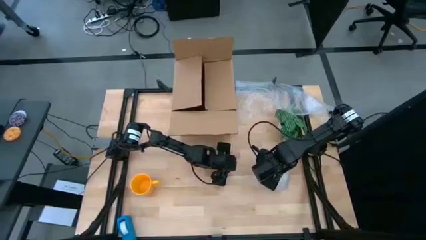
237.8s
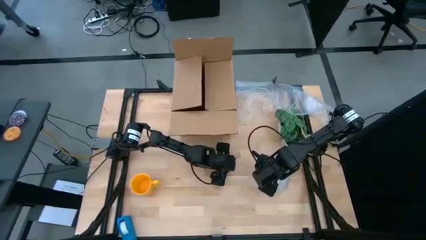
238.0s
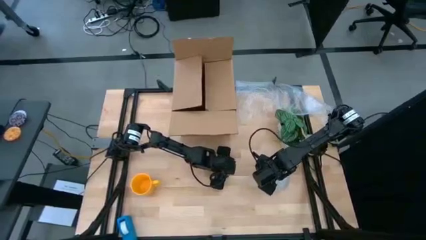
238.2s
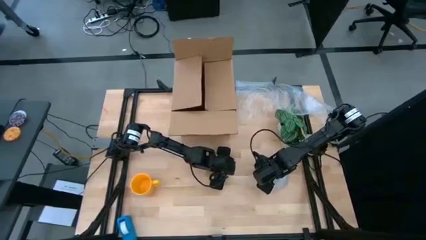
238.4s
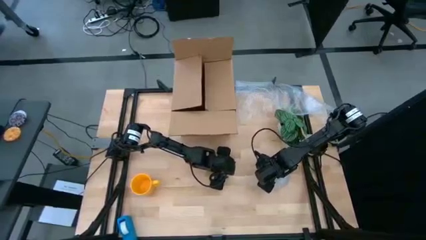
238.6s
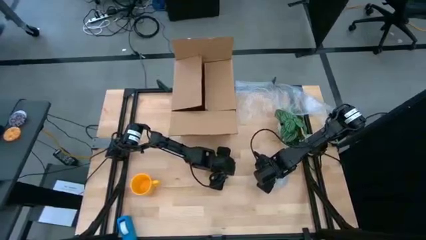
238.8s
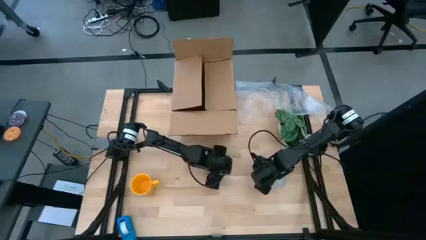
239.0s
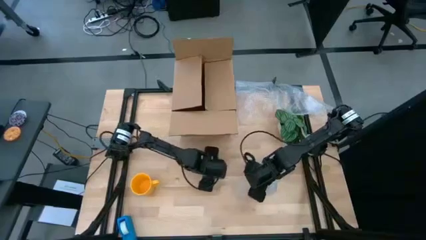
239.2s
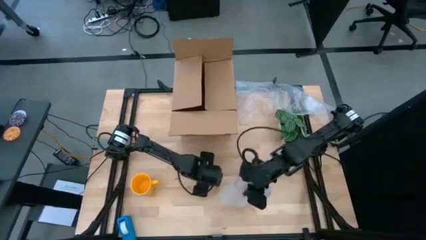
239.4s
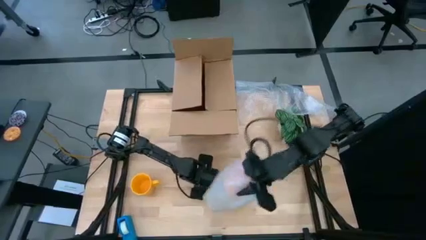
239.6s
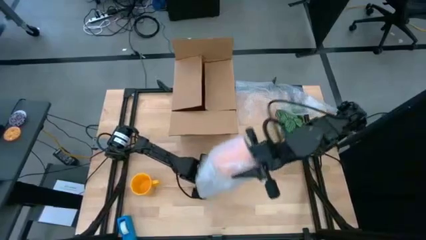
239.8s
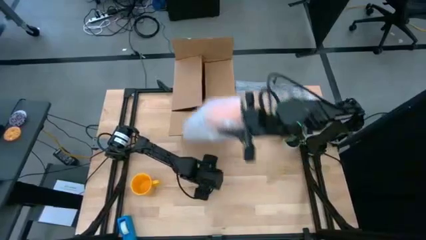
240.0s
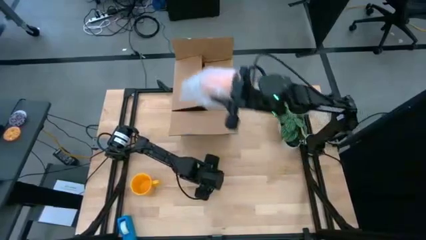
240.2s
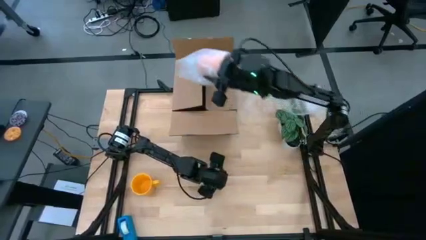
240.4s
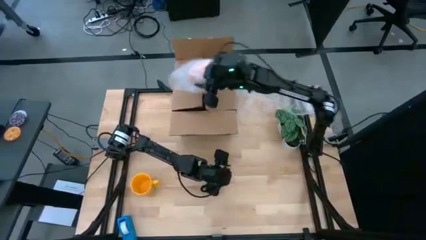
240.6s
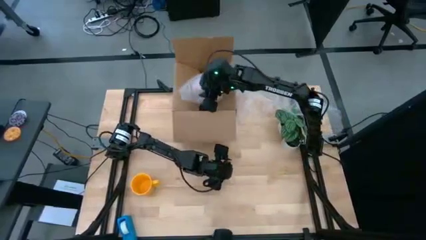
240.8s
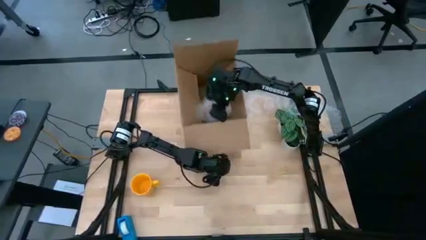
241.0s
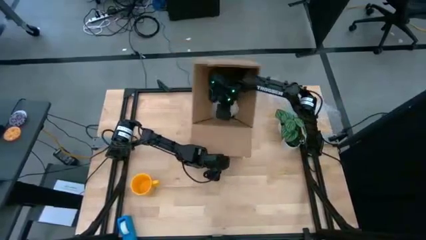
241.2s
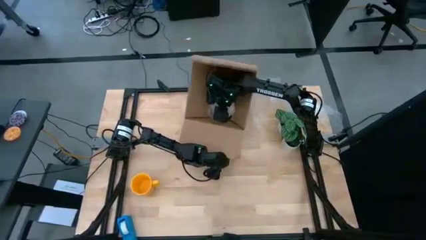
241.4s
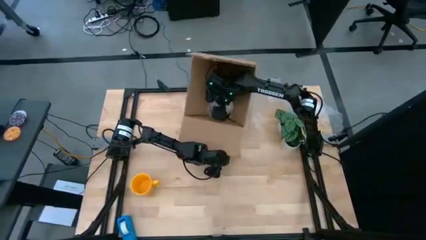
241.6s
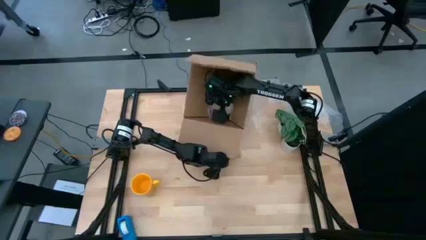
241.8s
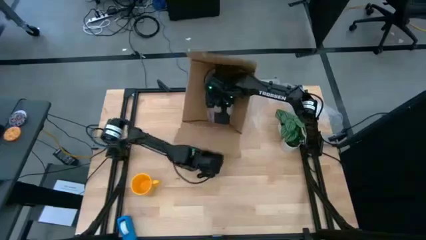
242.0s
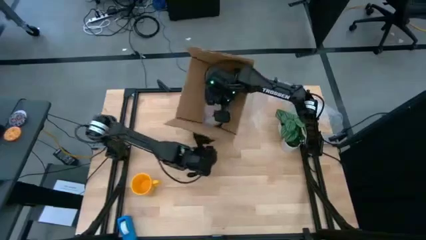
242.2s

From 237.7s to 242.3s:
Task: wrap mug
Put the wrapped orange mug into the brown box

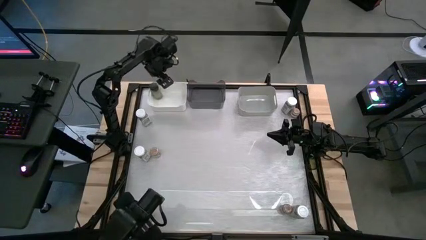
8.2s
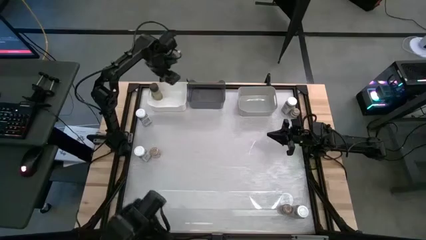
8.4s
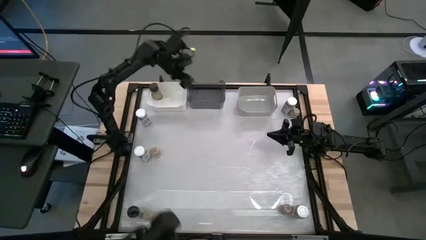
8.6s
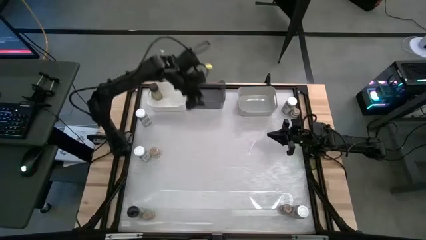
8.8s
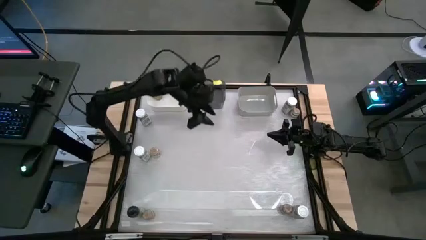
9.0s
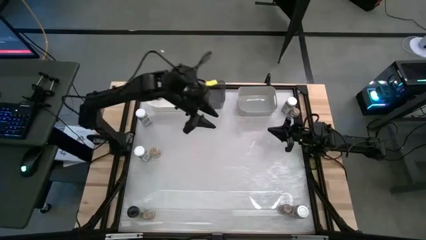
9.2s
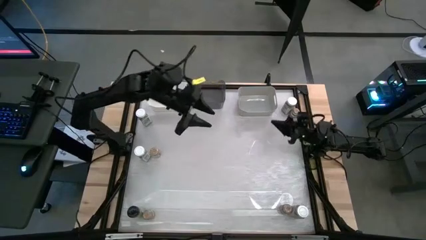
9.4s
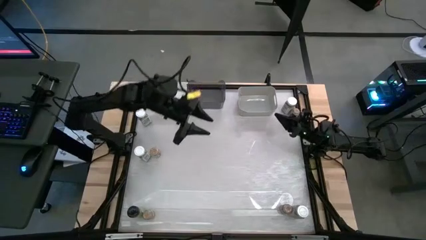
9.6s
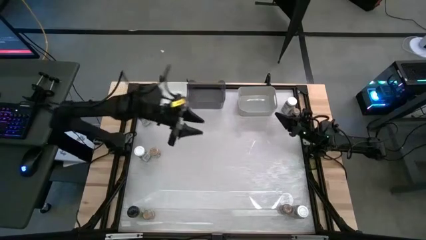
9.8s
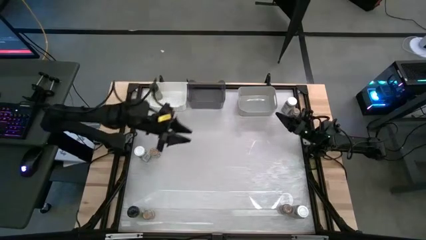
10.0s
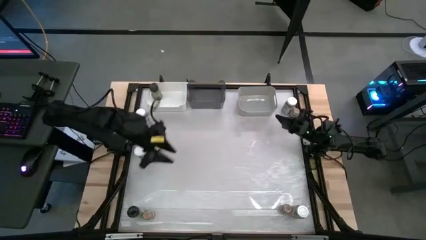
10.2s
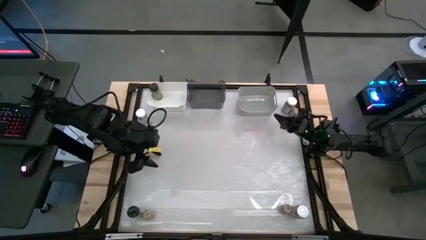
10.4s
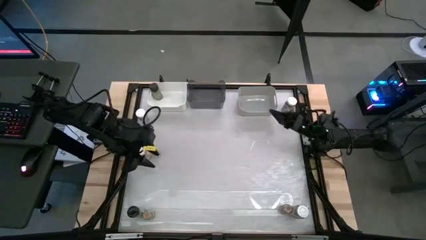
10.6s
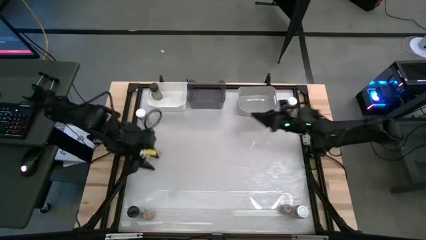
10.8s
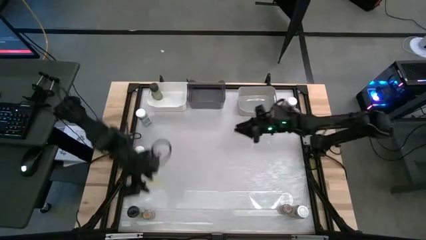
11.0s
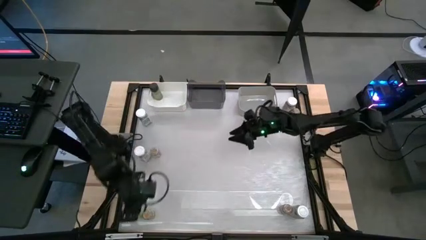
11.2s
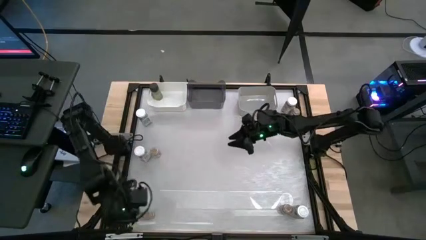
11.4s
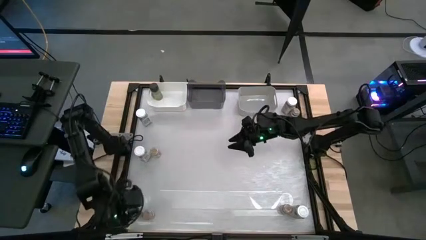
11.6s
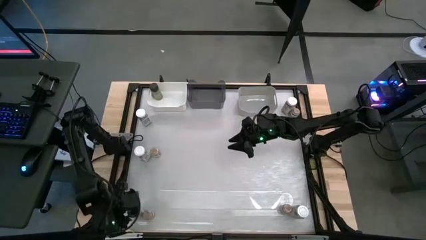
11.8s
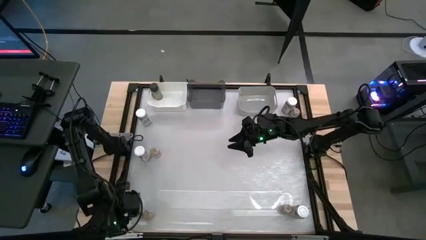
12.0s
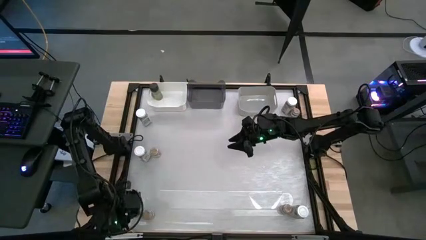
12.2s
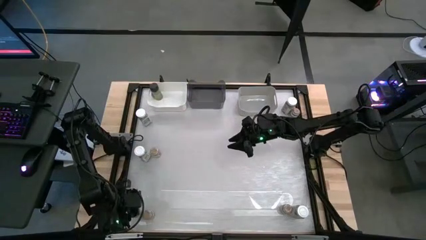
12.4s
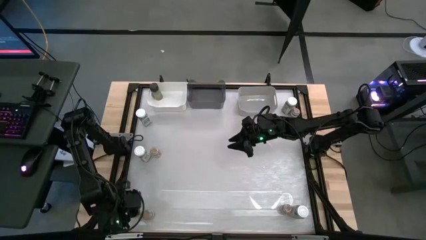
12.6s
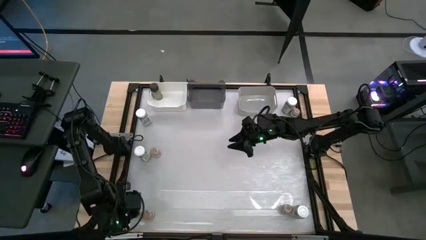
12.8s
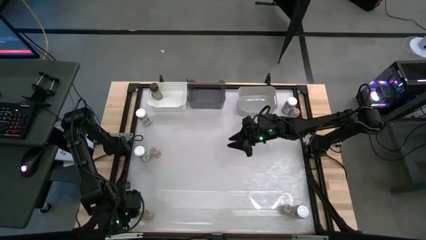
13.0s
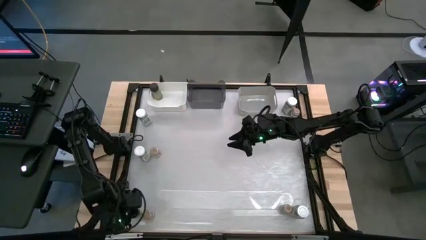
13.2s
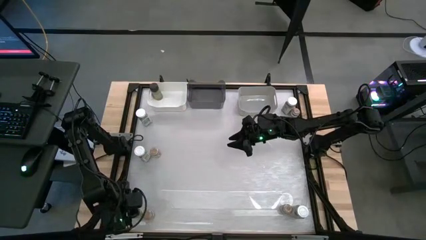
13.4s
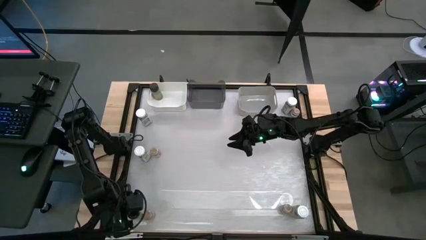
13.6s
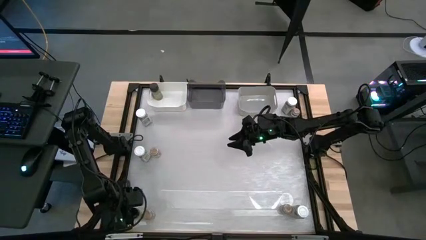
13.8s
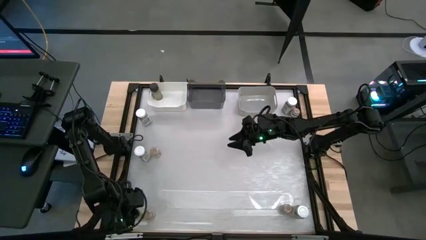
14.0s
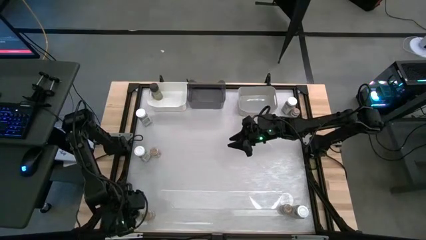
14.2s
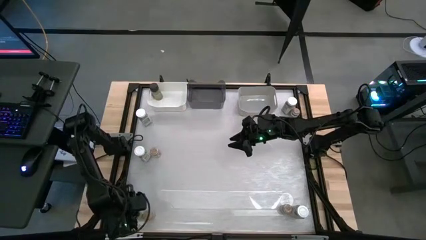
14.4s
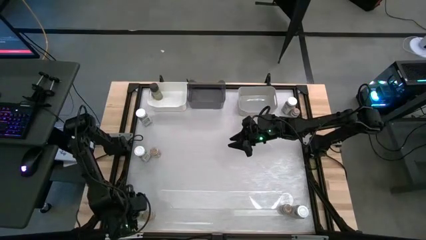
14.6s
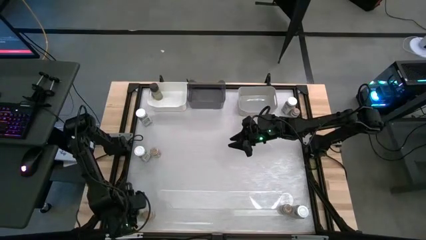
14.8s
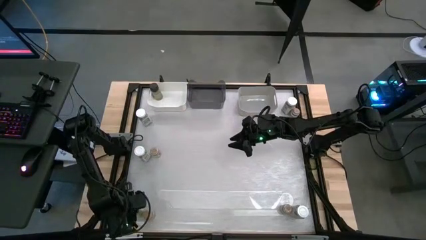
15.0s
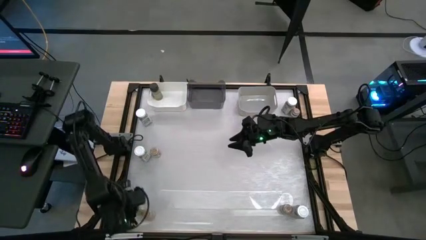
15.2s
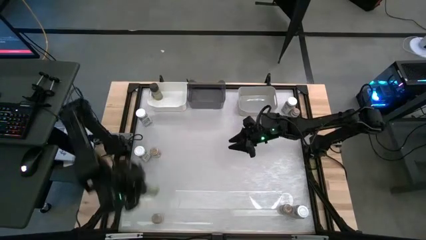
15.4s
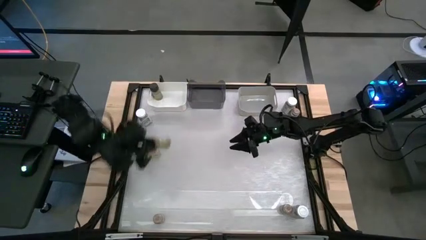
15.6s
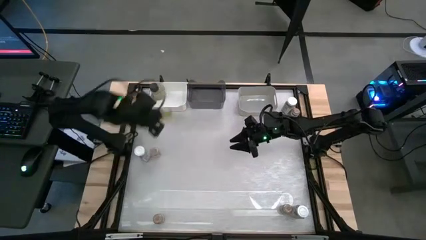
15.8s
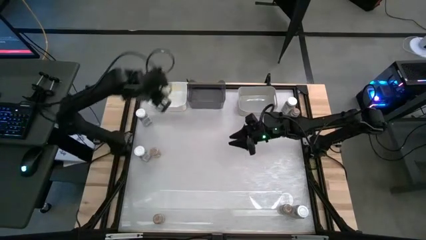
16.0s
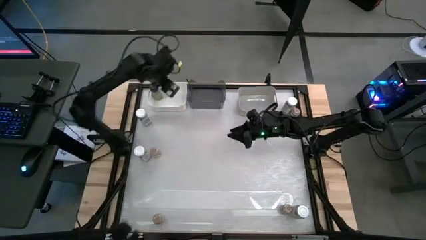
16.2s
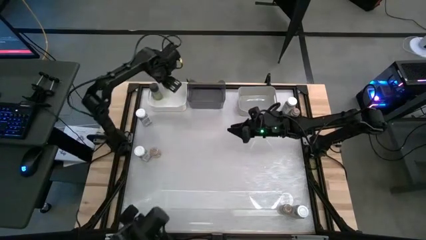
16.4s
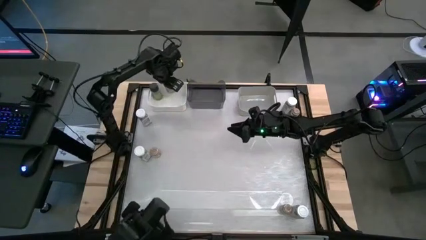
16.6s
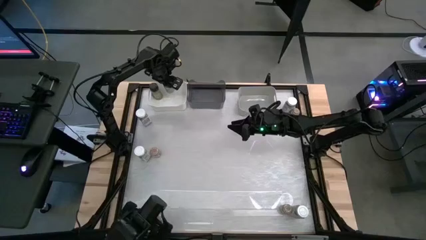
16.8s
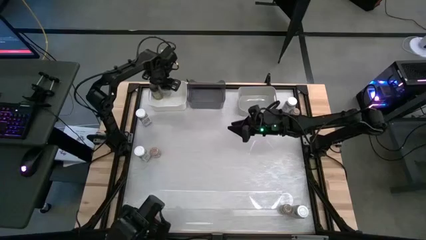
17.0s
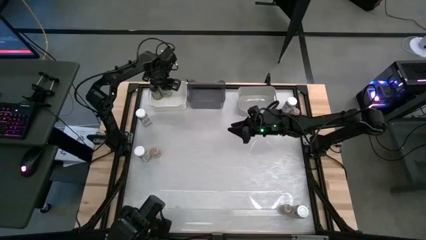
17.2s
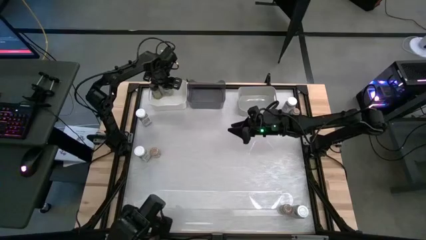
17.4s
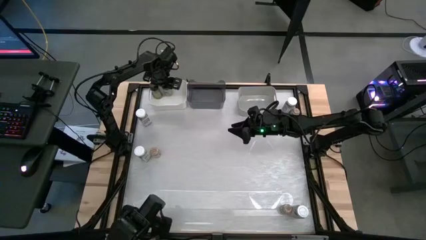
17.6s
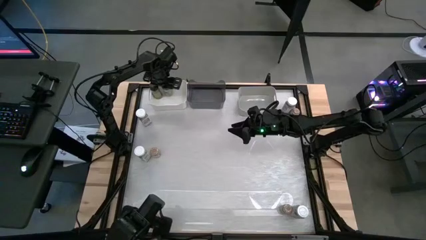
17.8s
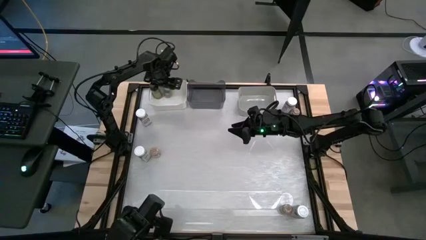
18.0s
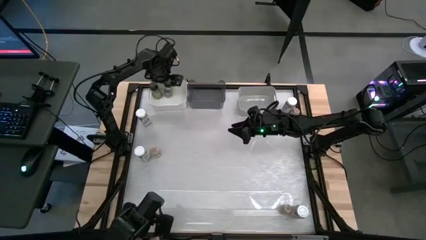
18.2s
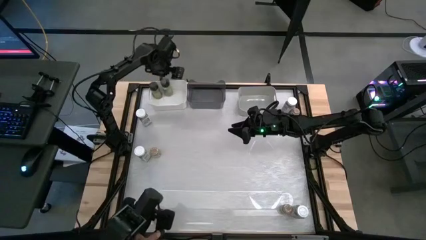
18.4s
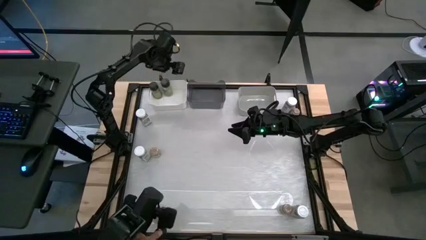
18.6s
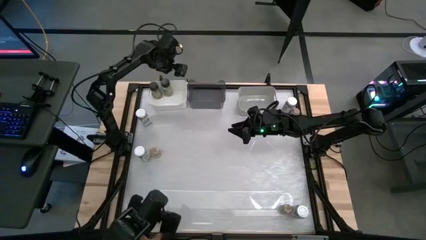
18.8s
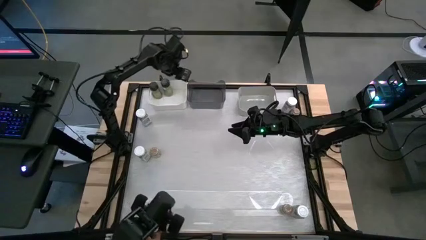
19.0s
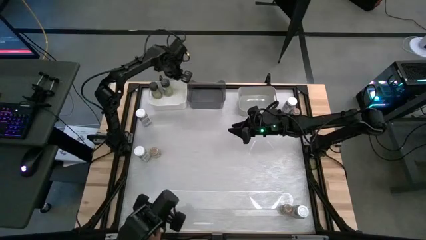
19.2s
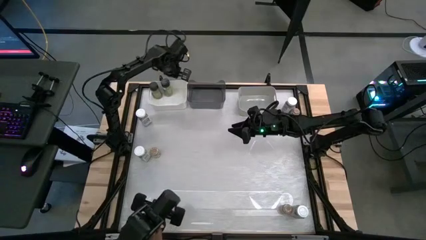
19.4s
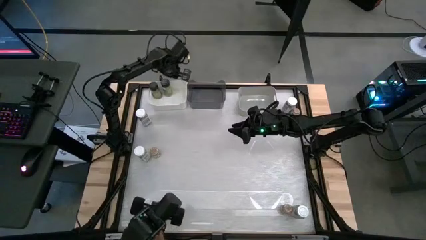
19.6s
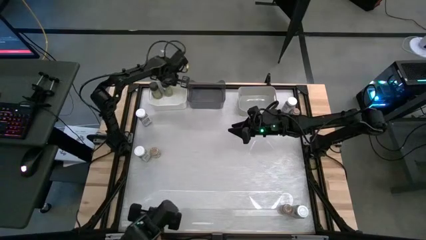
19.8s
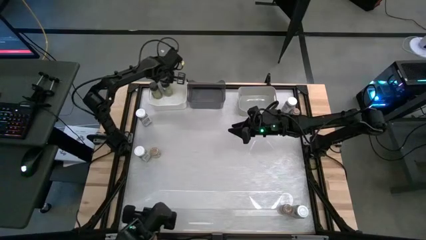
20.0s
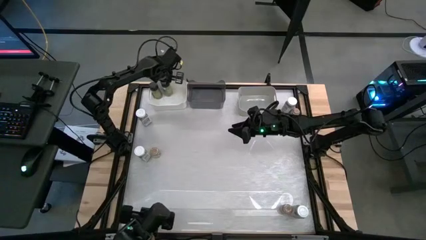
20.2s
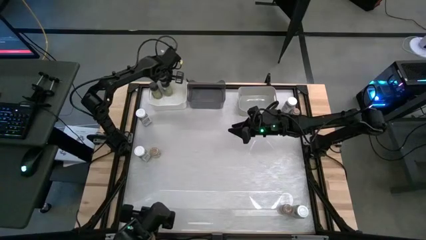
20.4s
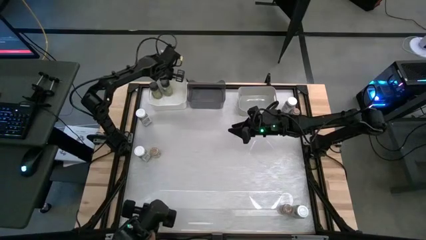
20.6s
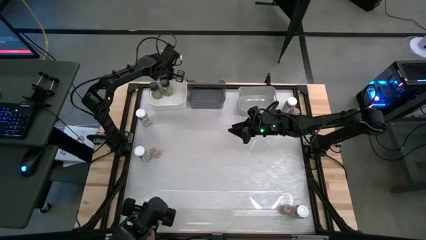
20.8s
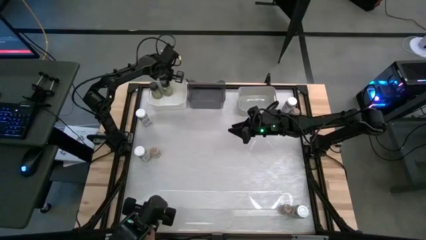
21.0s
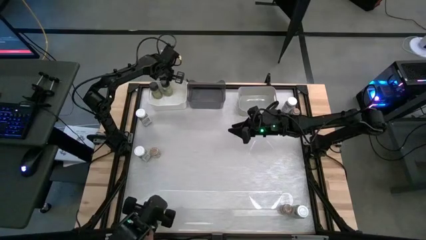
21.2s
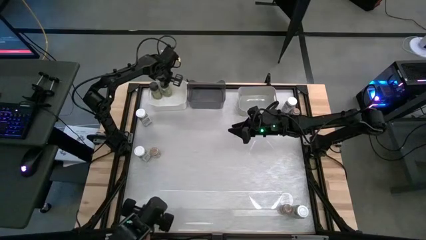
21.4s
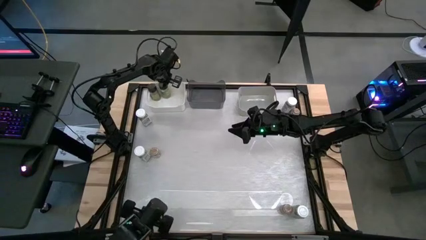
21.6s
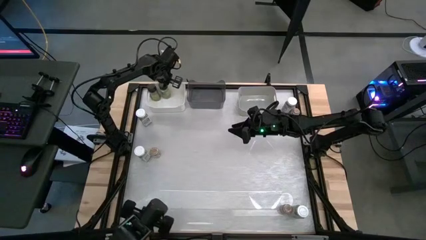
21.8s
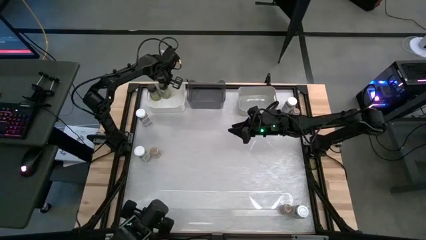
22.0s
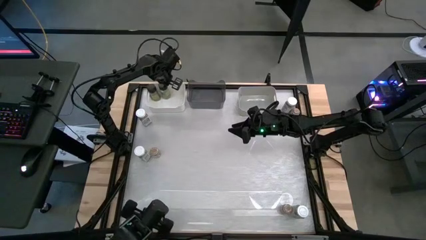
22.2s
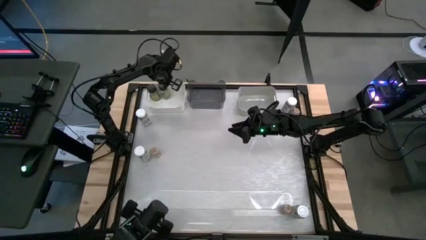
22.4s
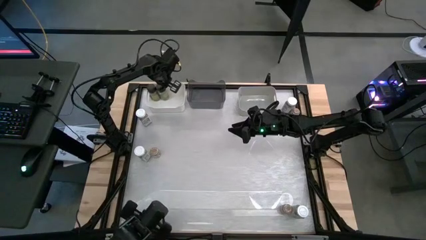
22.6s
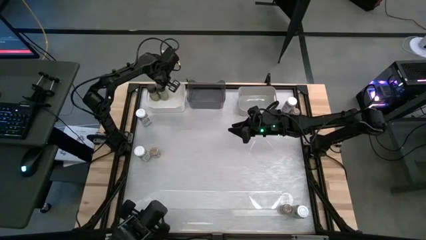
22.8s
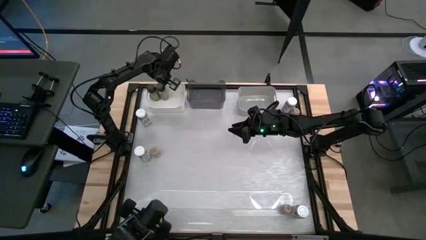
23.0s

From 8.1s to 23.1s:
Task: Sort spices by type
Put the black seasoning bottle into the white bin
